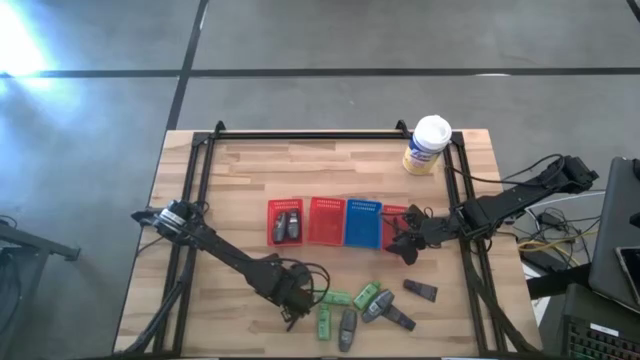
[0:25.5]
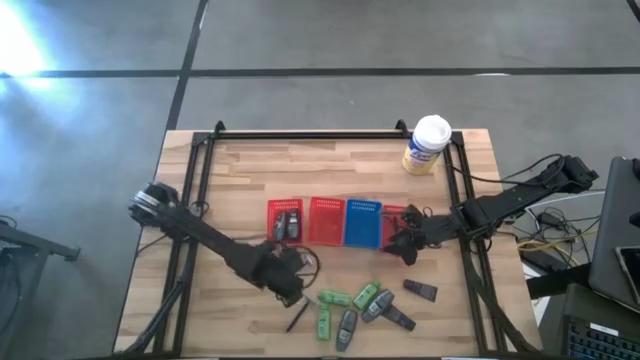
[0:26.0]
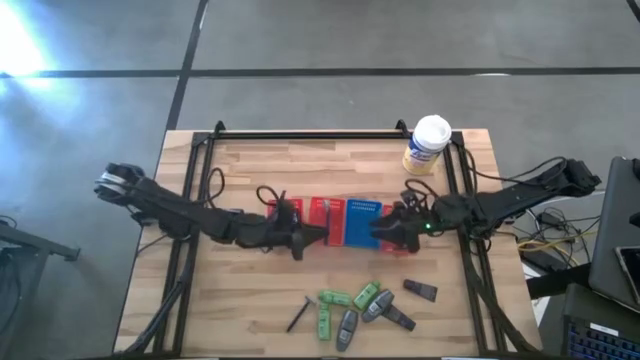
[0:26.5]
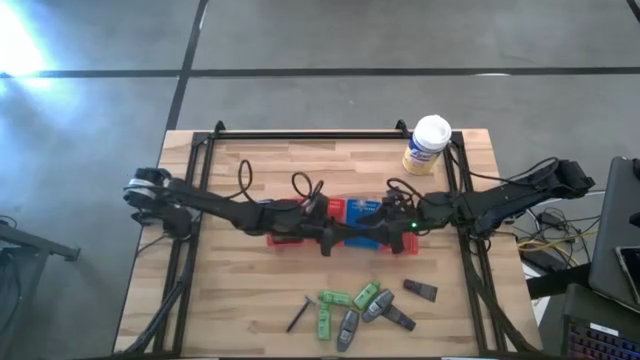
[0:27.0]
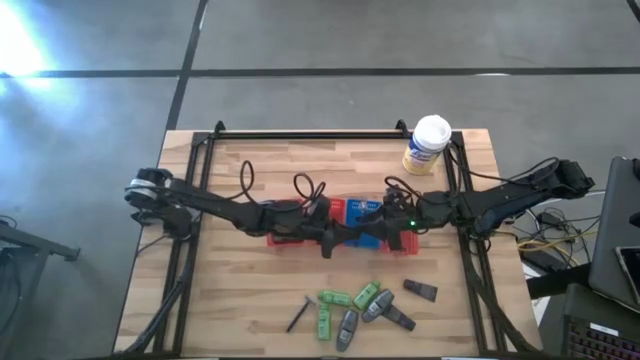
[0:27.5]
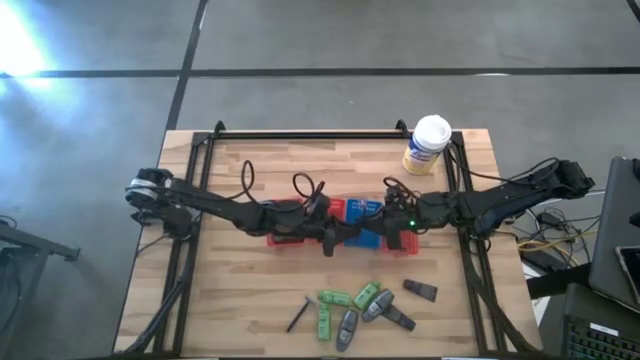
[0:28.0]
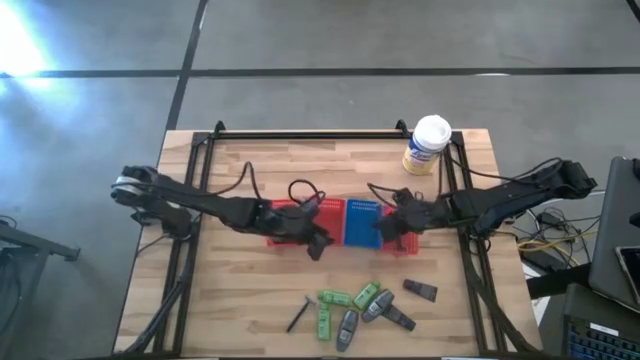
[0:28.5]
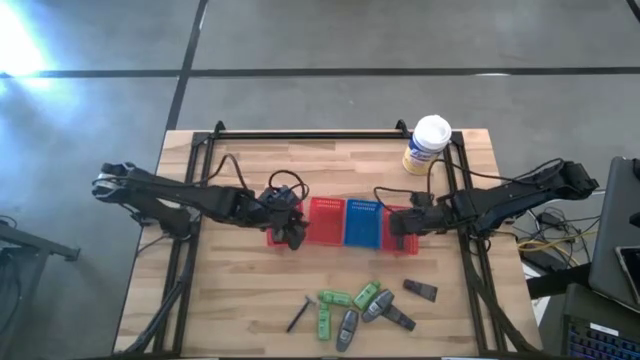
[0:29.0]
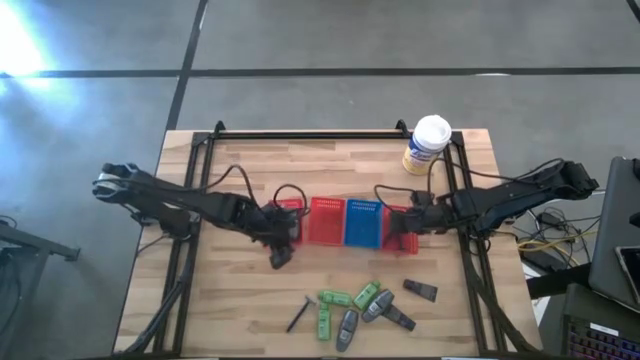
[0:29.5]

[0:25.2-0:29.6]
Task: Pick & Place Travel size toiletries
Put the blue razor into the right orange basket

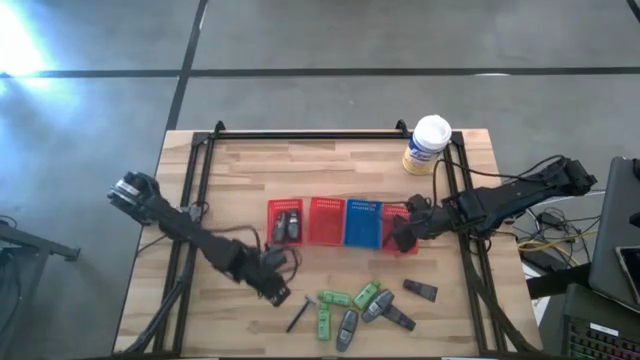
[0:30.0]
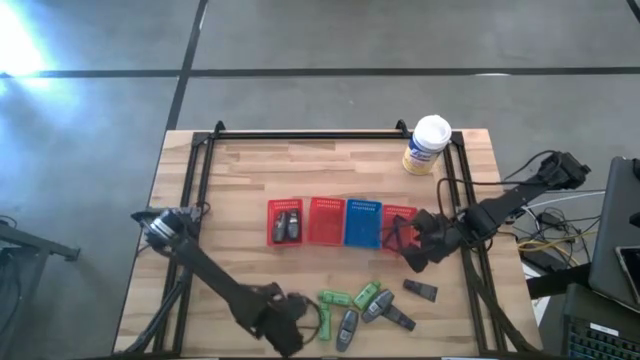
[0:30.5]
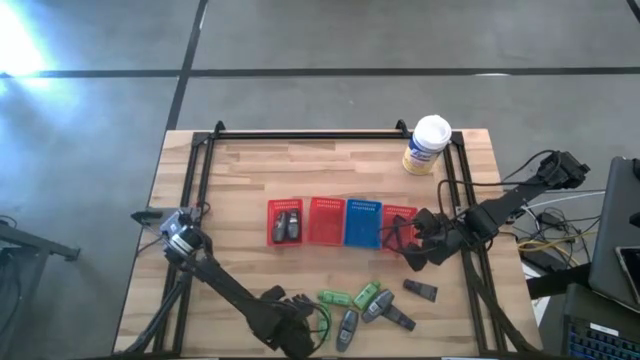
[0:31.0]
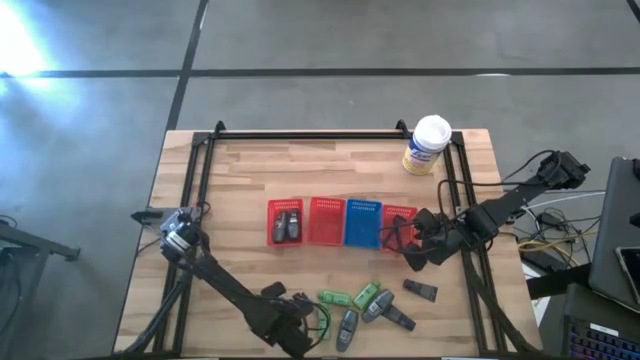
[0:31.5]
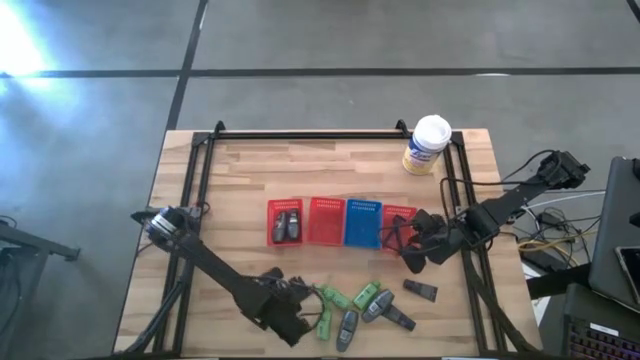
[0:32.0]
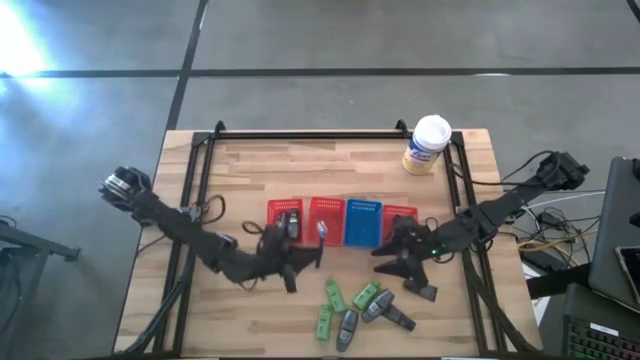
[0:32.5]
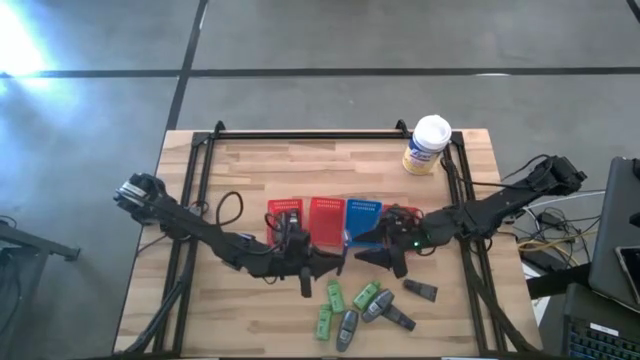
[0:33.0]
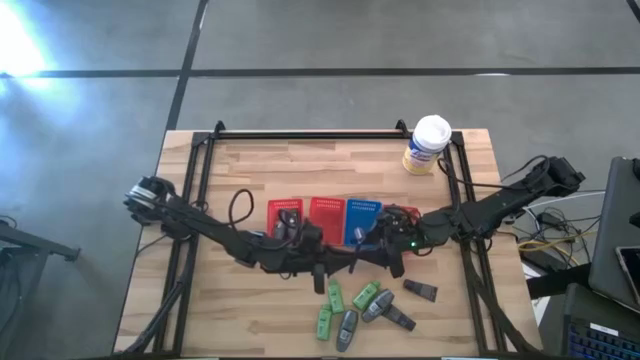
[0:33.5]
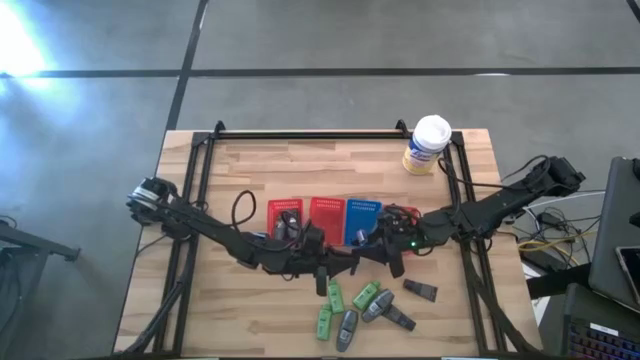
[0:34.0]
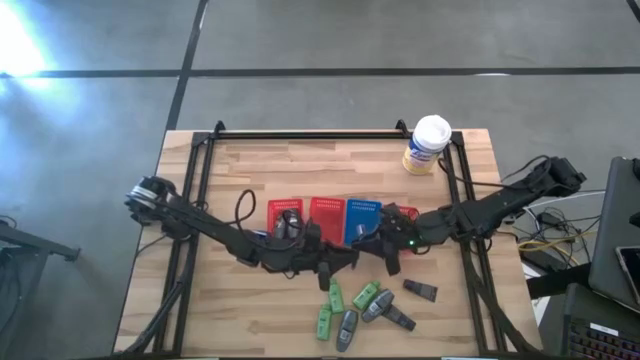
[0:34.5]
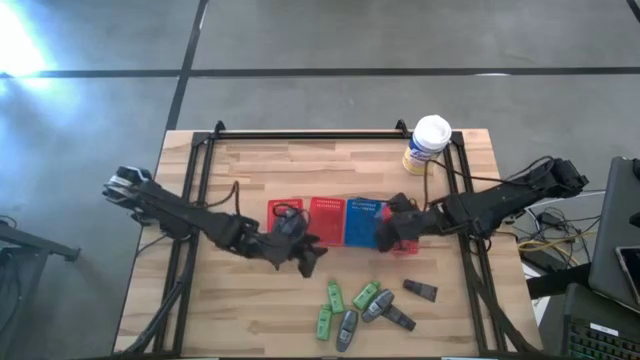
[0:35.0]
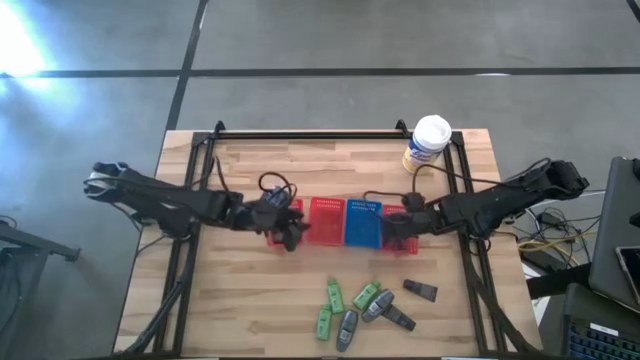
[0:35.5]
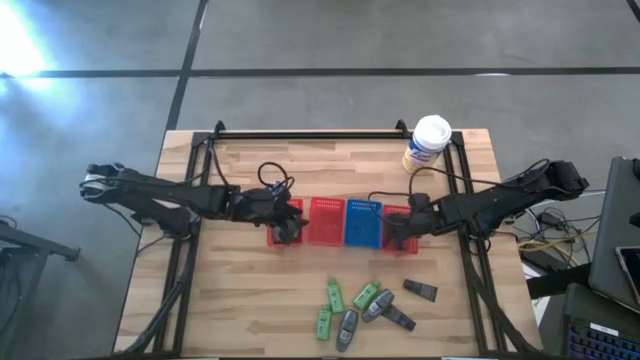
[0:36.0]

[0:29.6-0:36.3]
Put the blue razor into the right orange basket

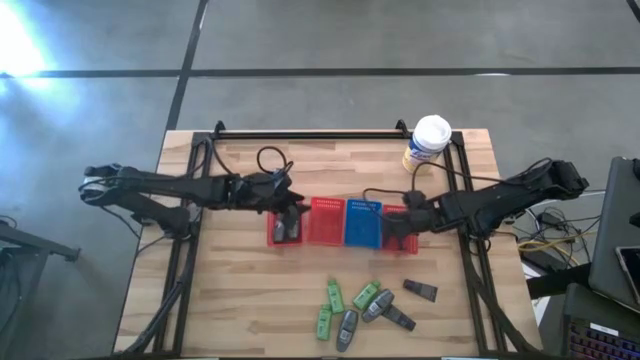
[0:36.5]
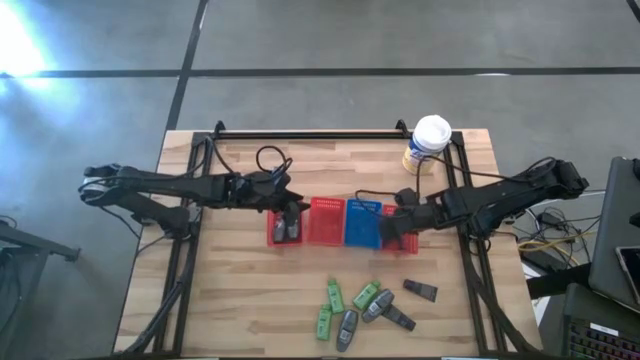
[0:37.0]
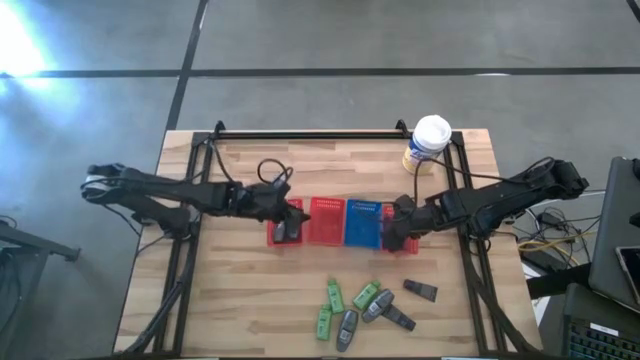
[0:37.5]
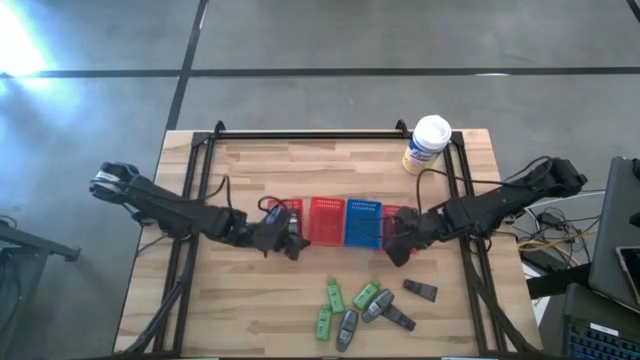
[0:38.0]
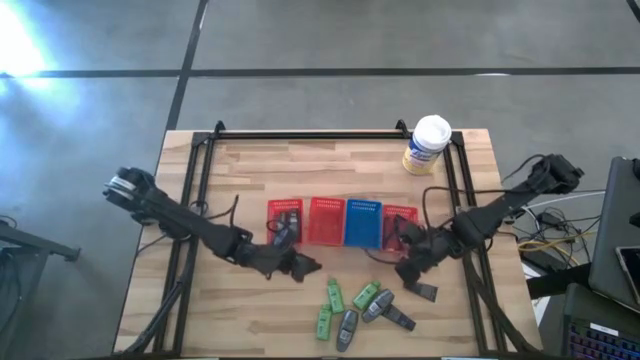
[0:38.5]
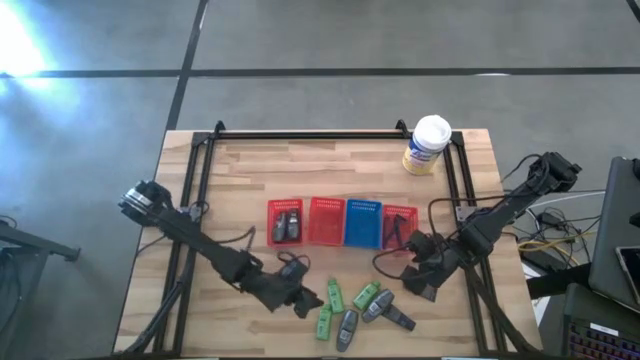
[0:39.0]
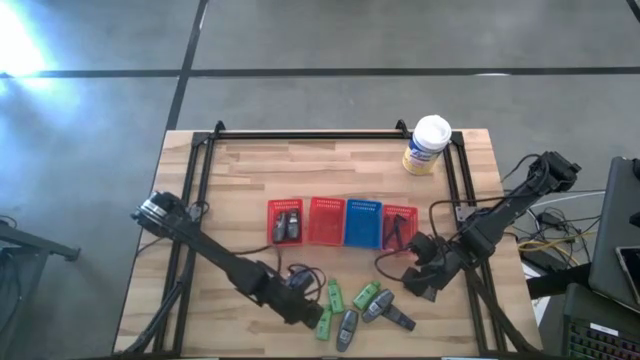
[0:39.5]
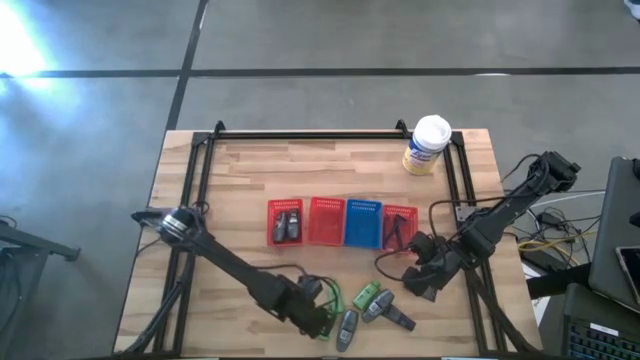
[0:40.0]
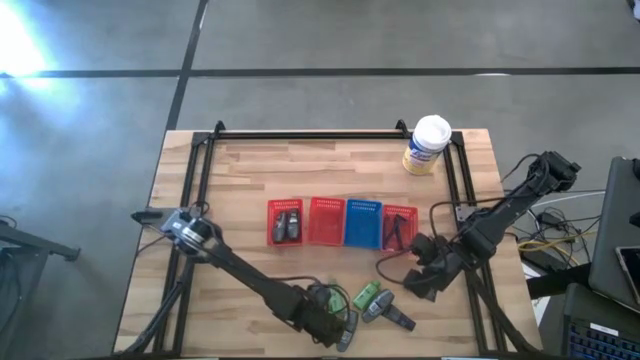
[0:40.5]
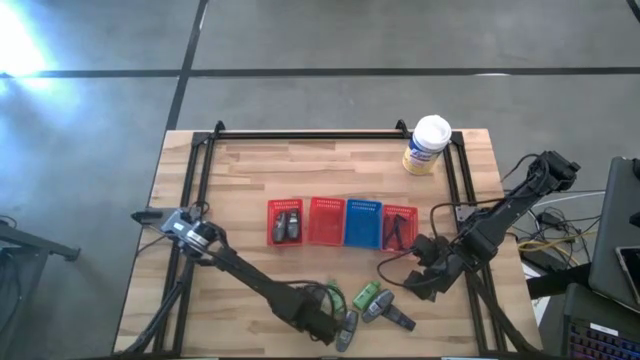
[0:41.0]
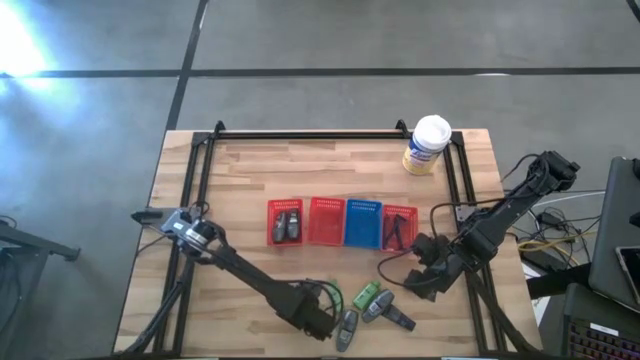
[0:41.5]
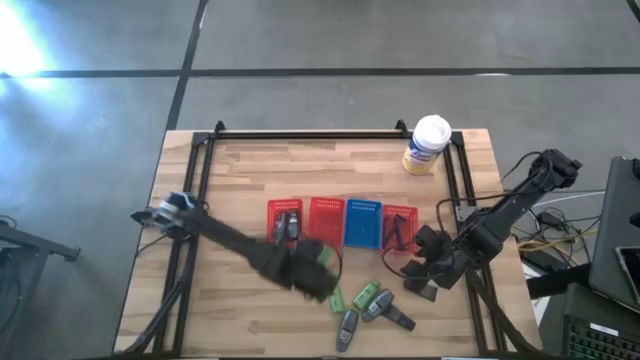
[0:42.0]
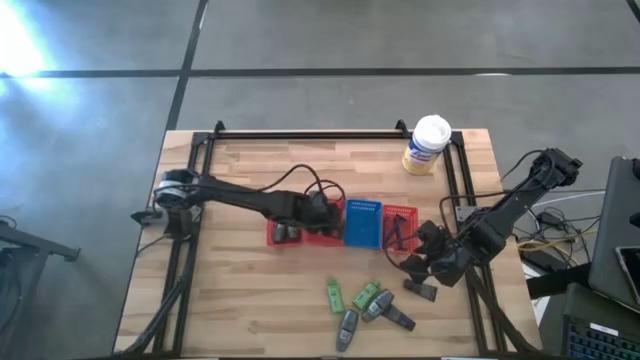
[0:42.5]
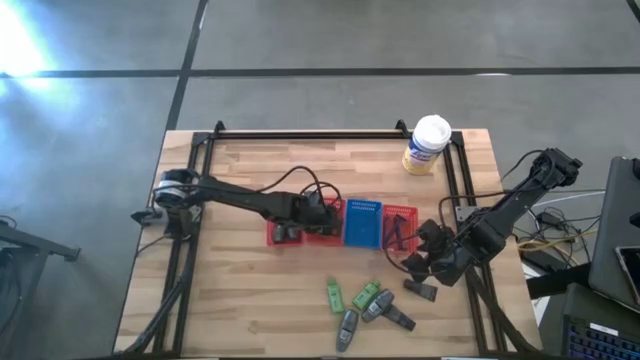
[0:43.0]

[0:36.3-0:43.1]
Put the green shampoo into the middle orange basket

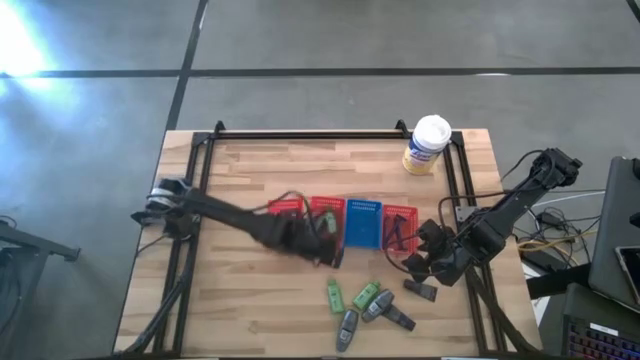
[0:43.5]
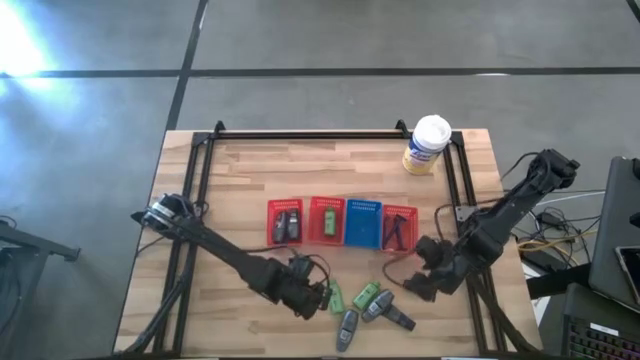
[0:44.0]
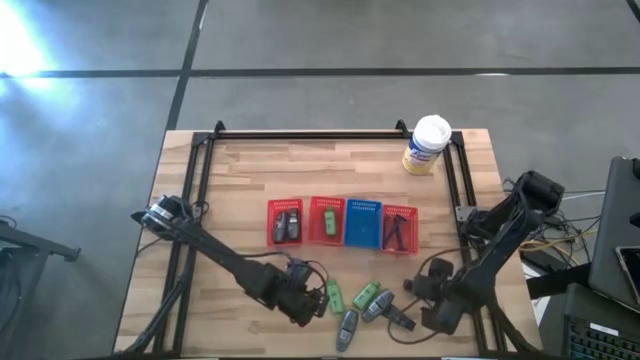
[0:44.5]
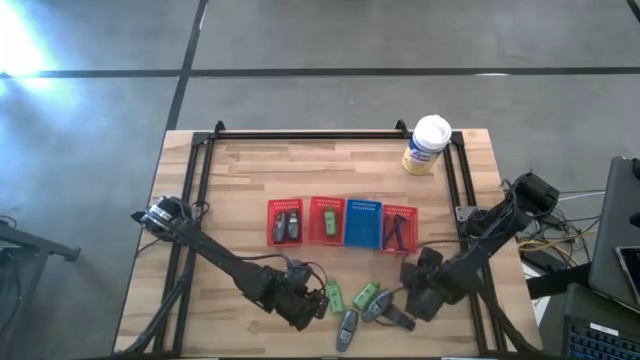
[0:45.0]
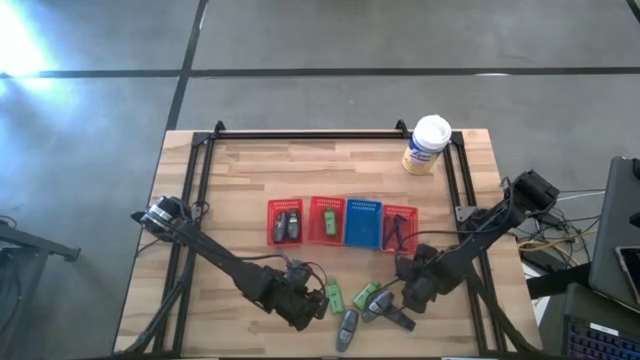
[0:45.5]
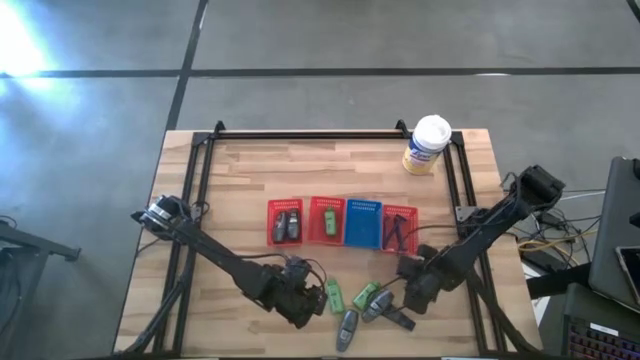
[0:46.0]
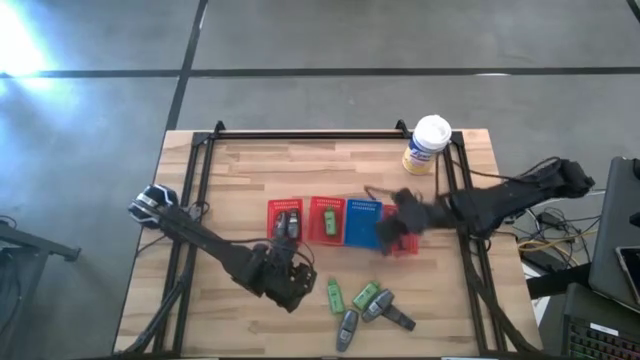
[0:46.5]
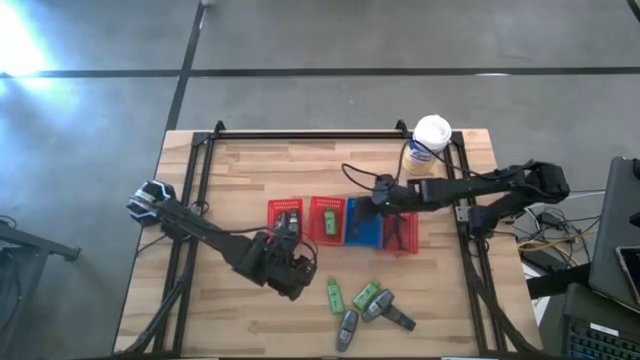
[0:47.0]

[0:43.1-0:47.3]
Put the blue shaving cream into the blue basket
